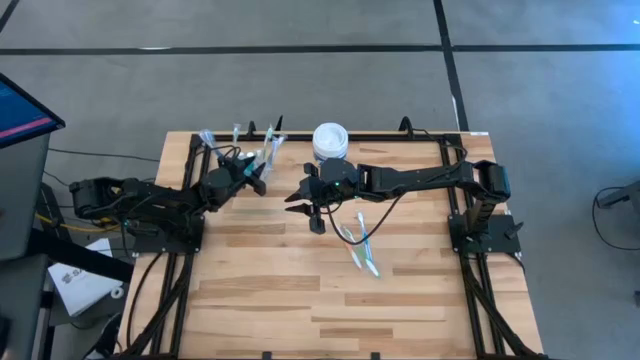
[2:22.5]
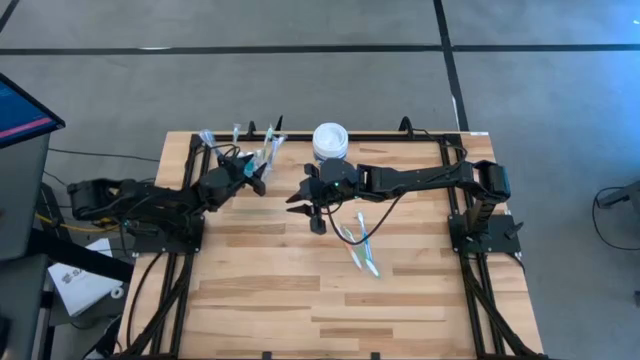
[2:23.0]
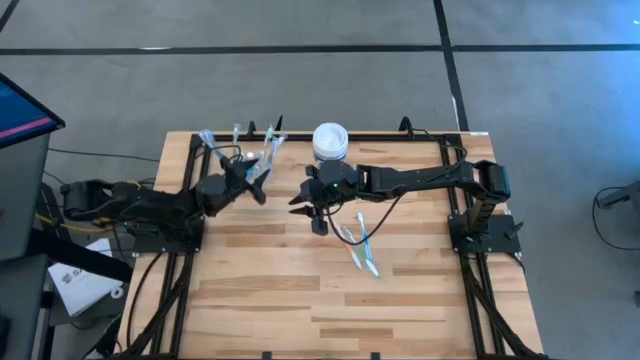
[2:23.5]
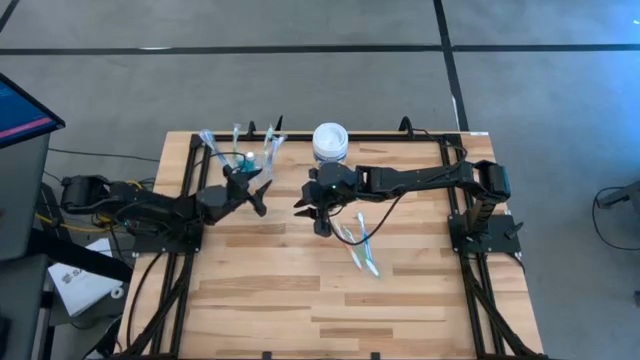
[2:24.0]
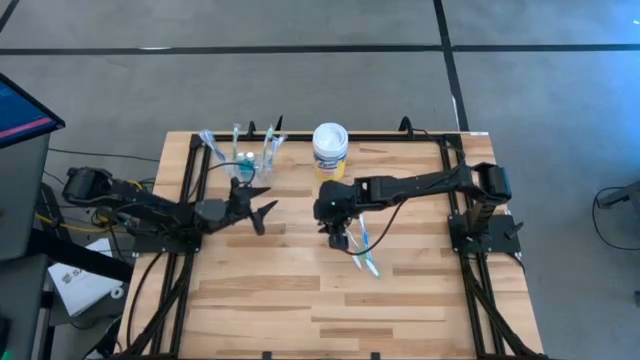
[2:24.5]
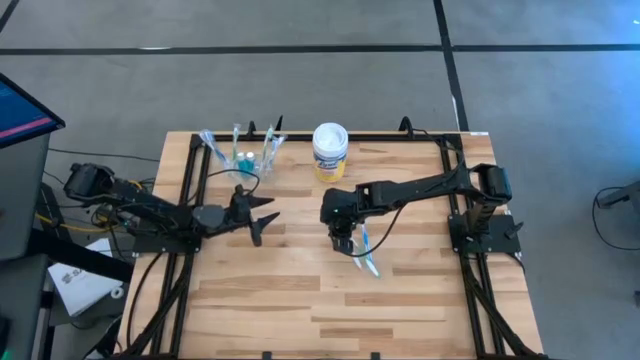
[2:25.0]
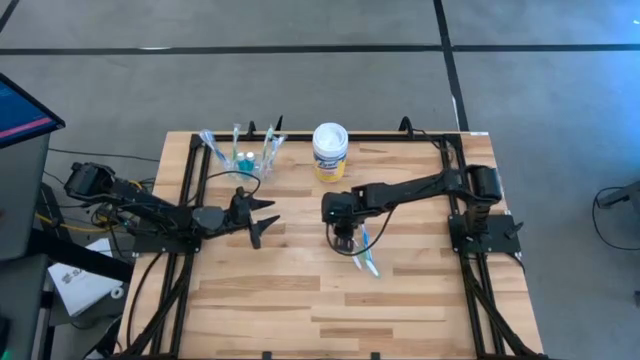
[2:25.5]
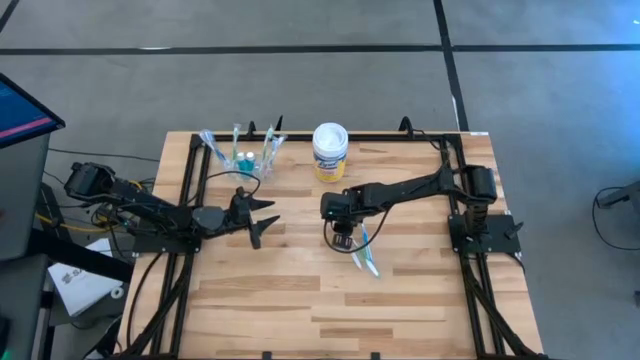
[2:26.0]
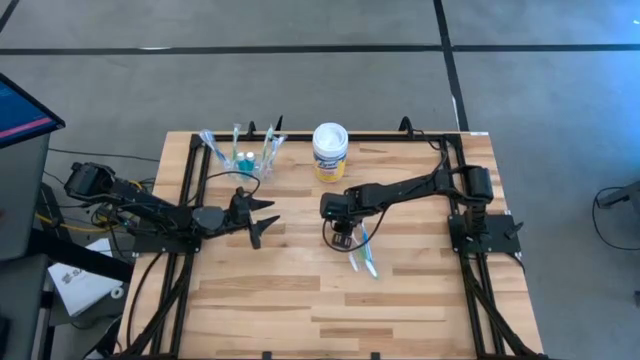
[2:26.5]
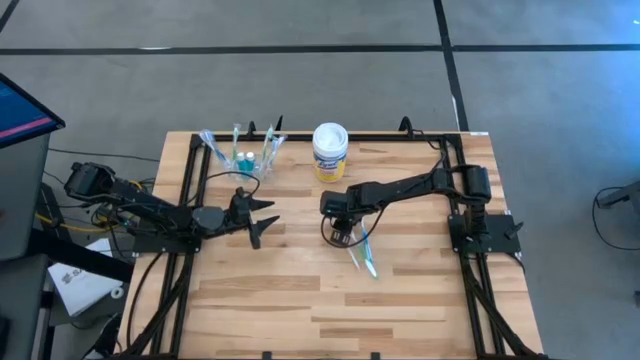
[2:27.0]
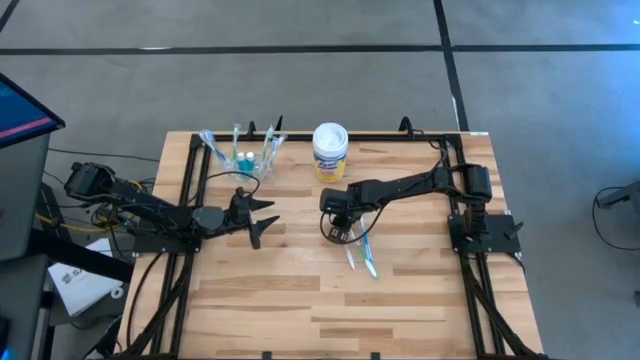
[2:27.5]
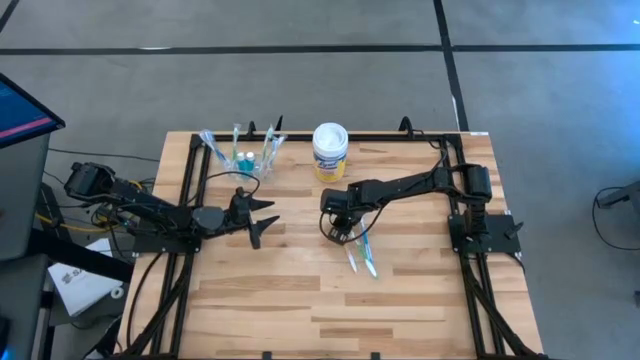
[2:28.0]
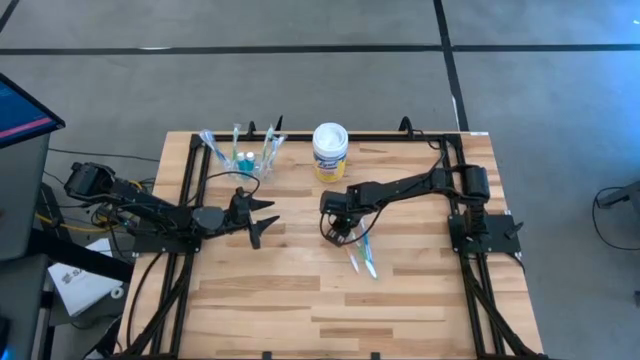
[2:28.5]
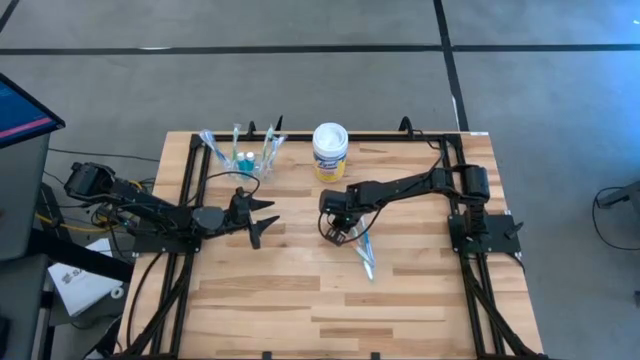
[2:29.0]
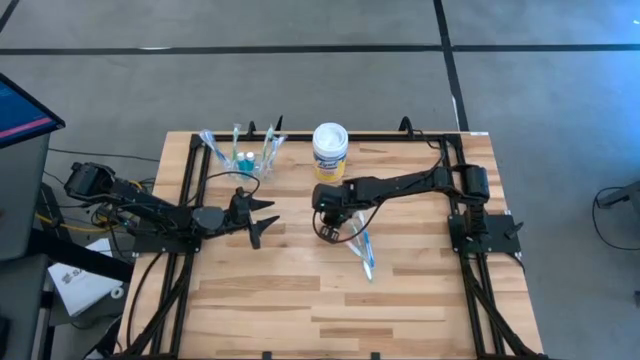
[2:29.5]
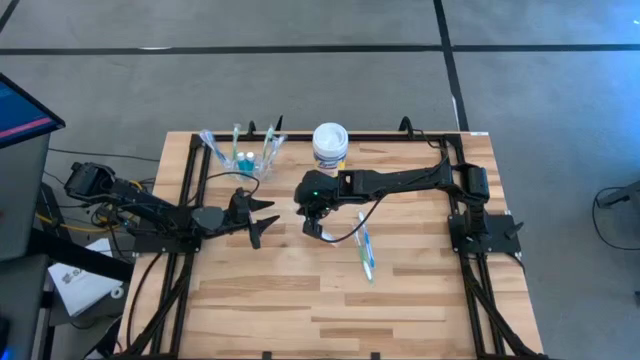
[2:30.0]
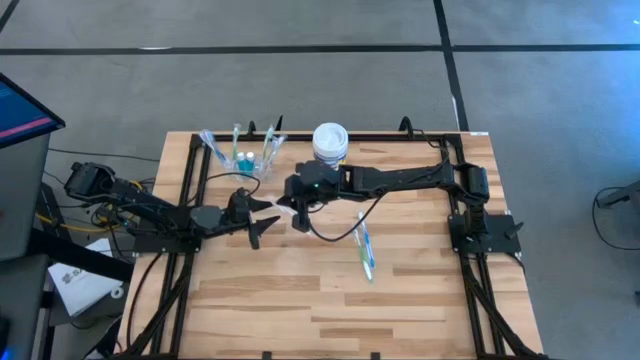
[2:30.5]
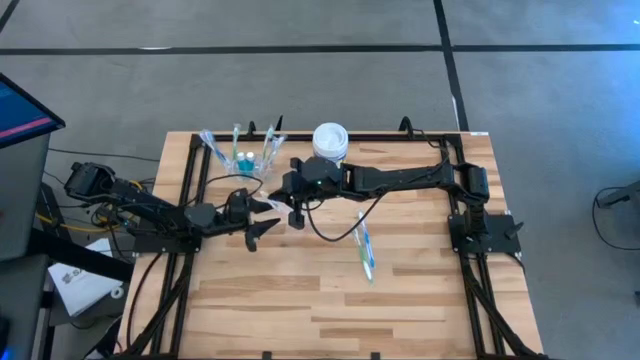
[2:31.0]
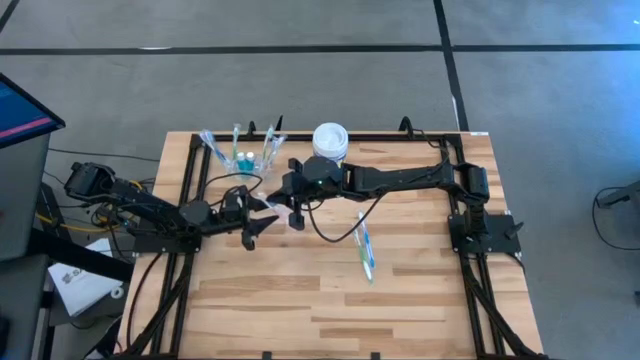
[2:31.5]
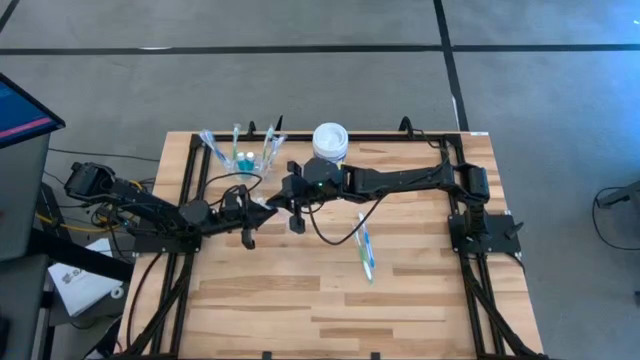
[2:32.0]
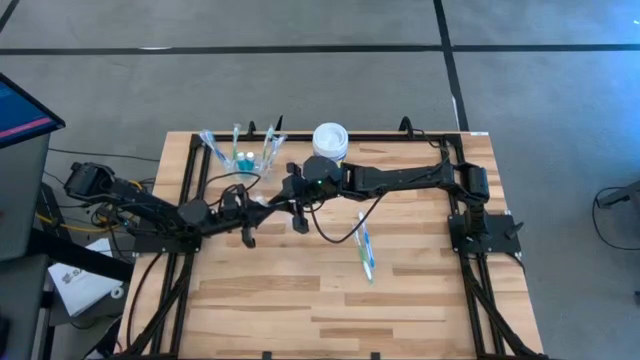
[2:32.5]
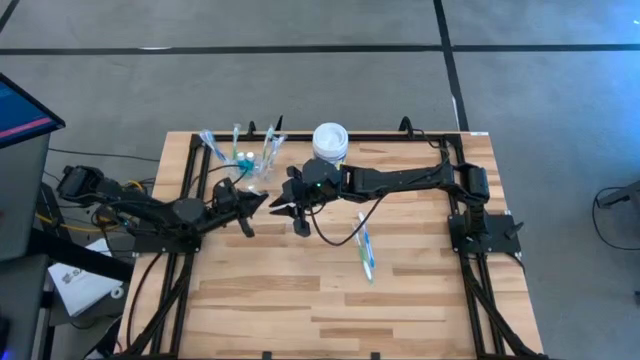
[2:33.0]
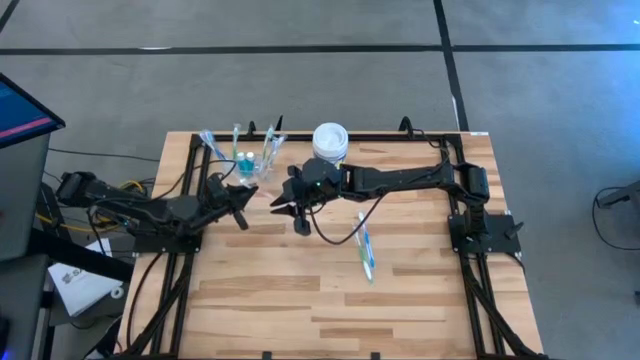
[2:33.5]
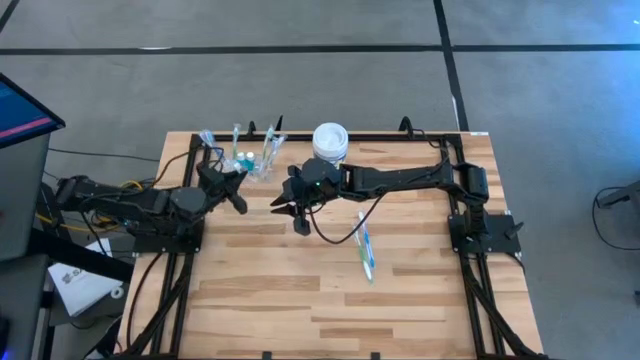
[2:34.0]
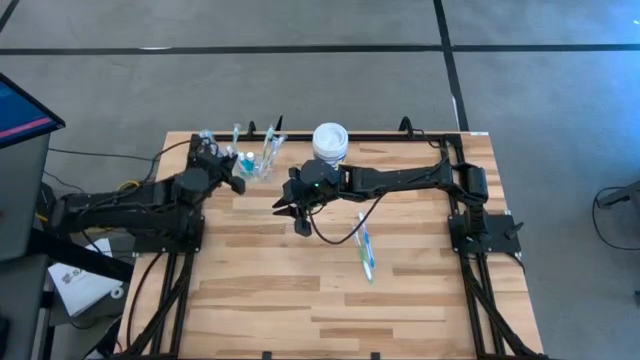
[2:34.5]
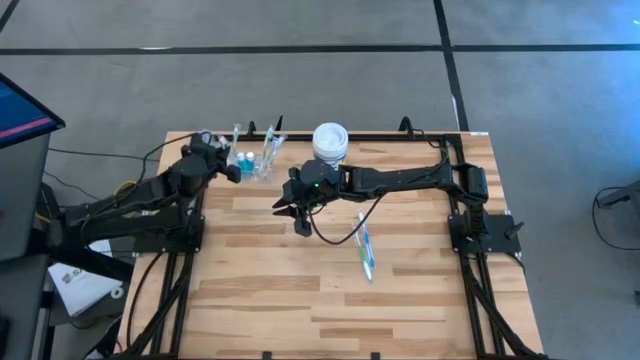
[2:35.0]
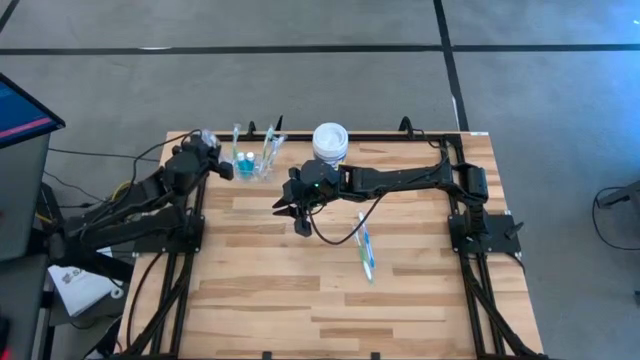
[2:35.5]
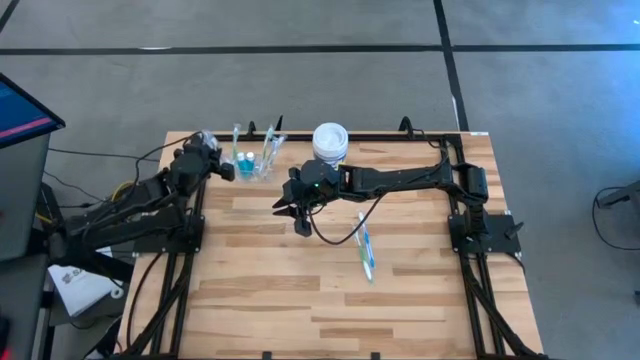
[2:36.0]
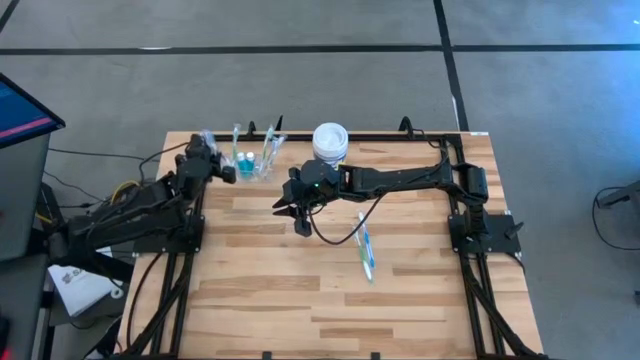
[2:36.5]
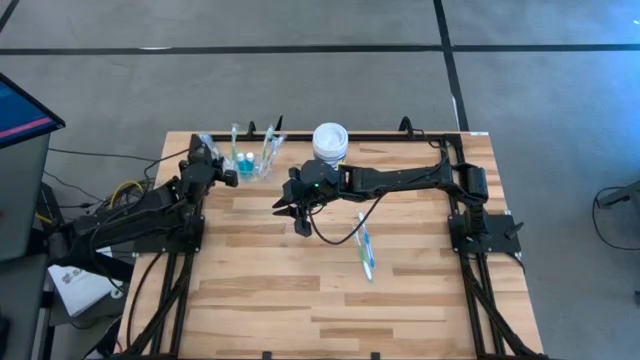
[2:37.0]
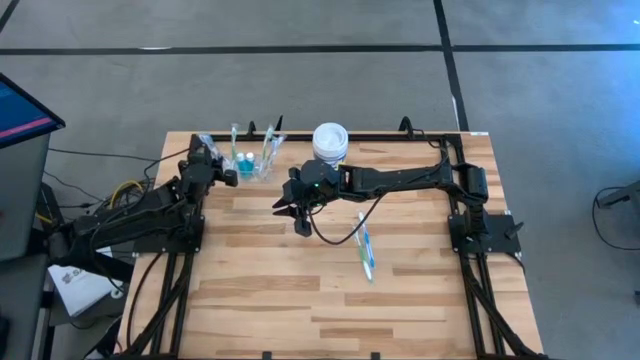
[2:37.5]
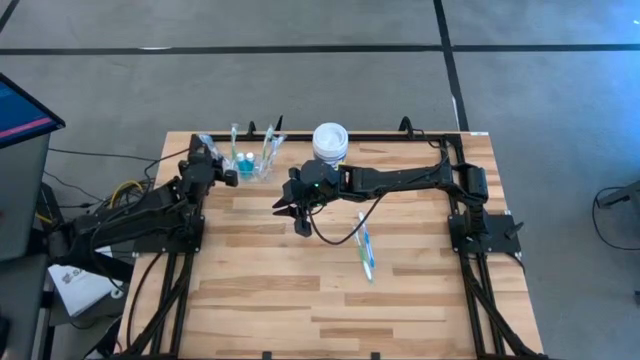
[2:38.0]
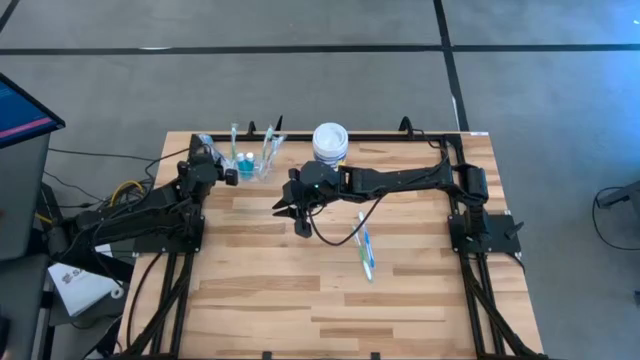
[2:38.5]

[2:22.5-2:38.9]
Task: Pick & Place toothbrushing station
Put the orange toothbrush into the transparent organizer

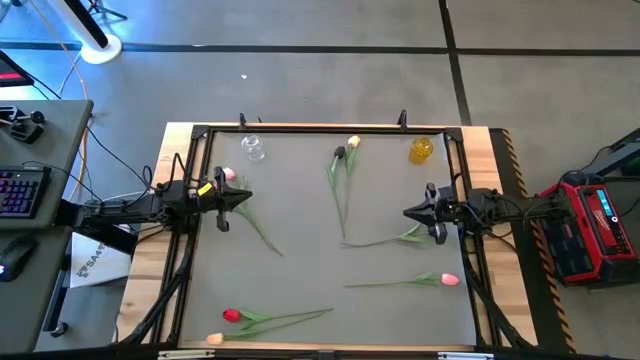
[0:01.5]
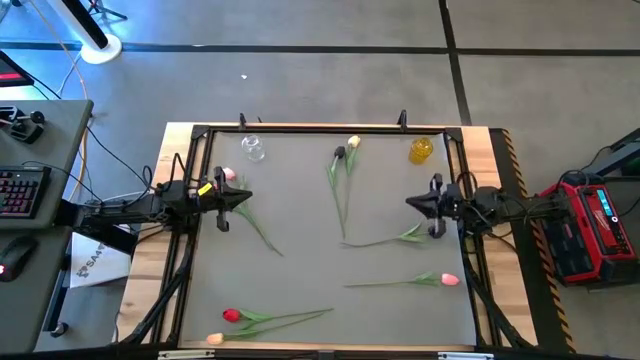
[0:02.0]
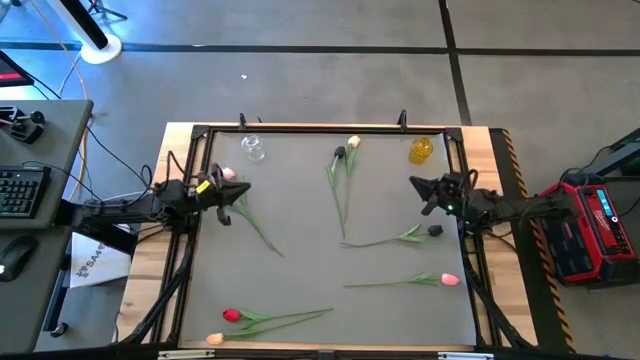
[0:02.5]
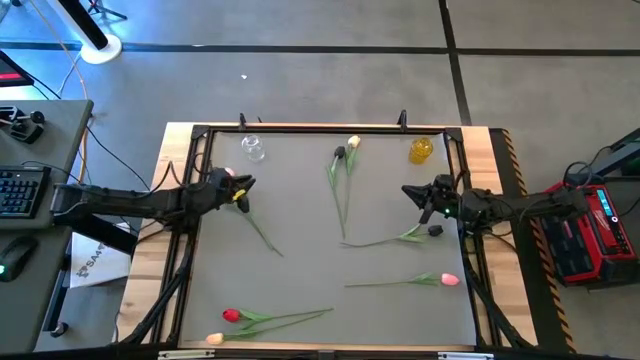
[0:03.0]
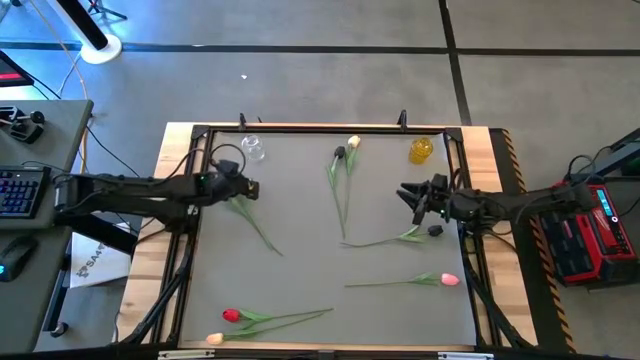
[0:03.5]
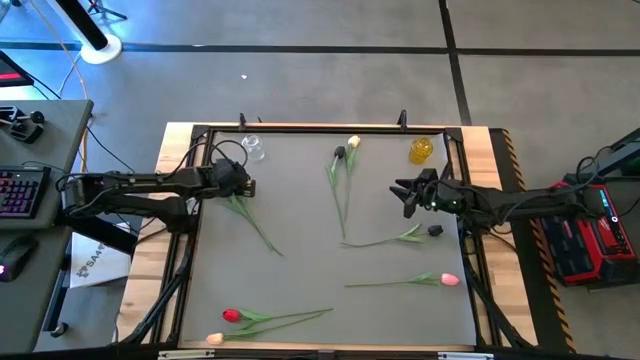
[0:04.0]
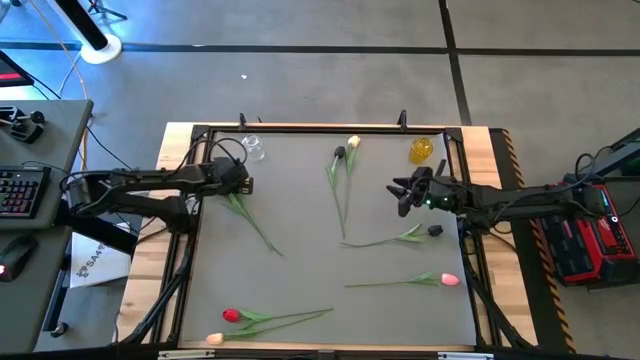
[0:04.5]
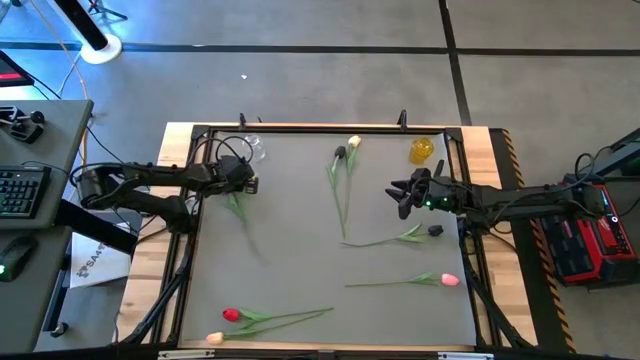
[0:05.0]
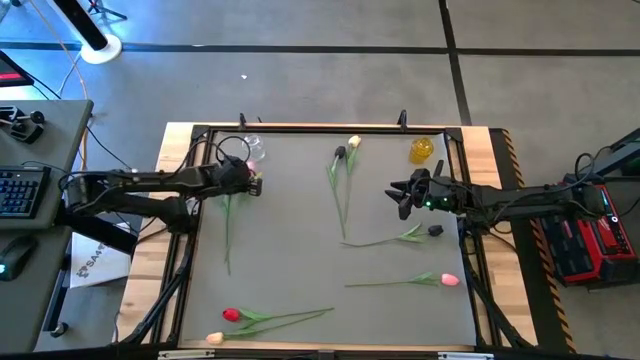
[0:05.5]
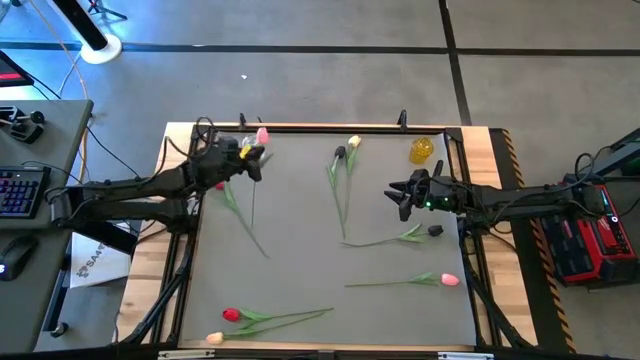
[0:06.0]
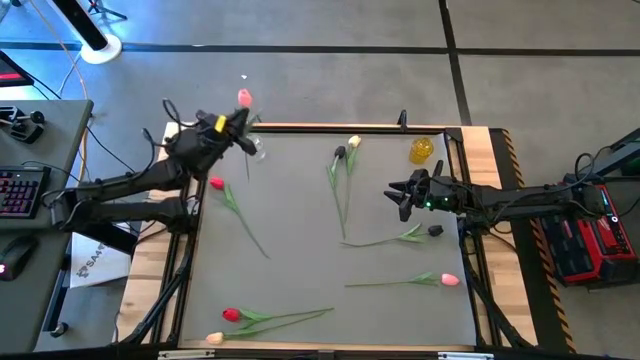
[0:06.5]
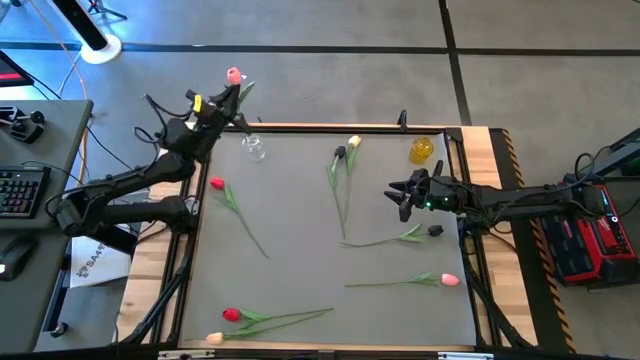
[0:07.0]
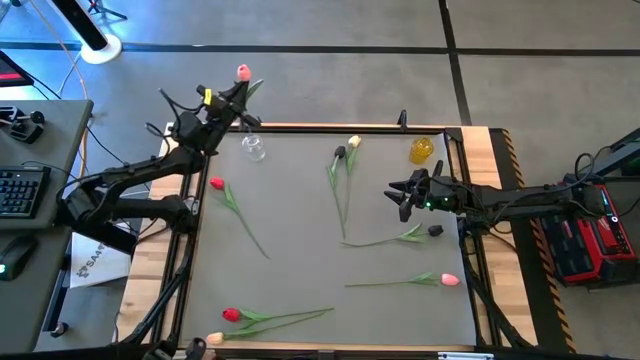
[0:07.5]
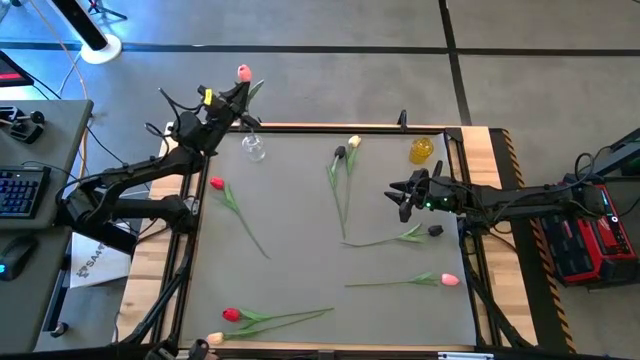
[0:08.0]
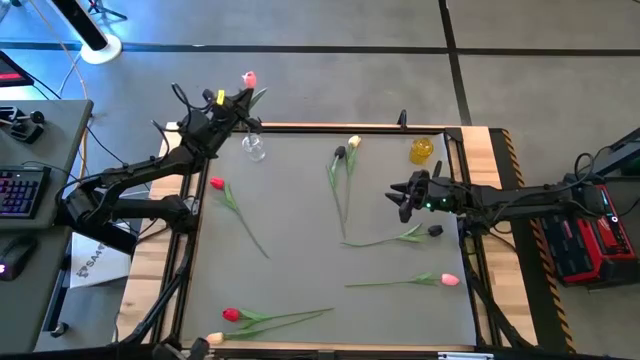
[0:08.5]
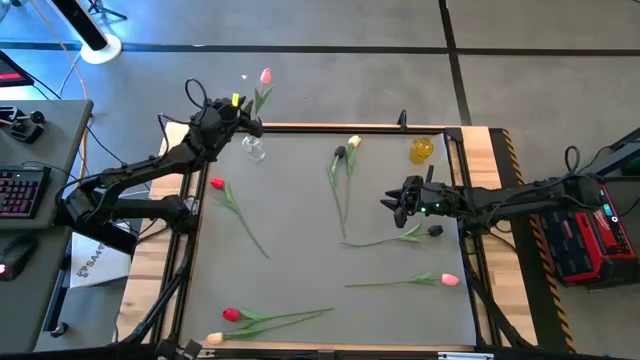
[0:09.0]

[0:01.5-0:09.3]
Task: Sort flowers into vase by color
Put the top pink flower into the transparent vase
